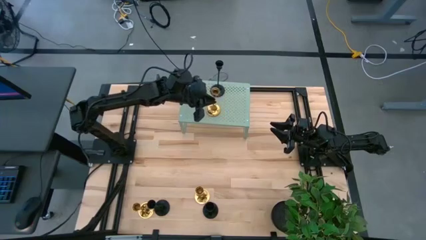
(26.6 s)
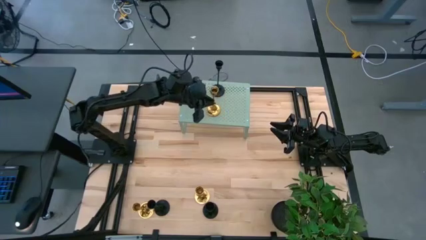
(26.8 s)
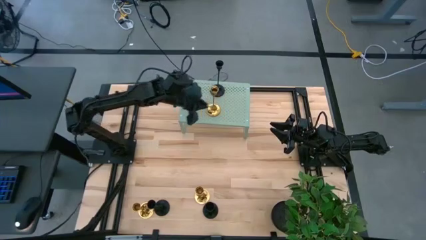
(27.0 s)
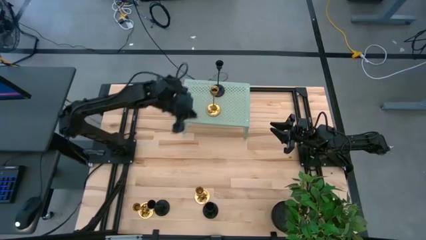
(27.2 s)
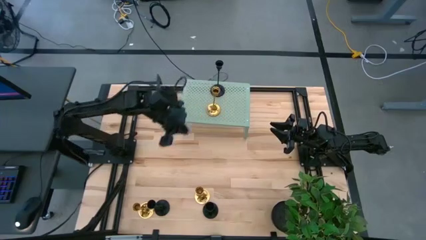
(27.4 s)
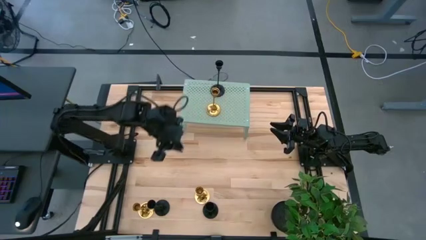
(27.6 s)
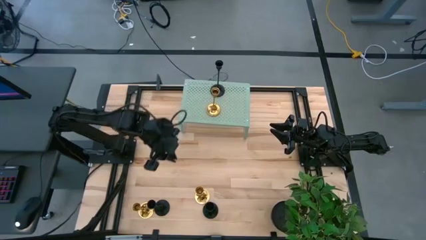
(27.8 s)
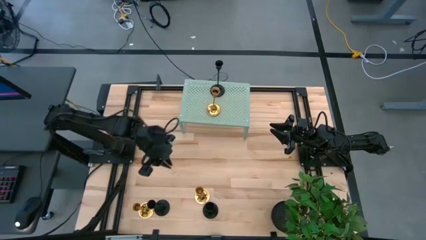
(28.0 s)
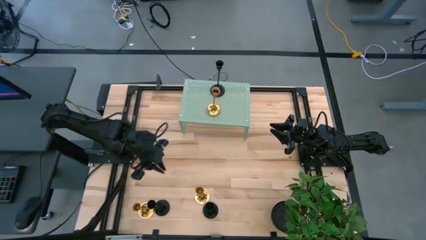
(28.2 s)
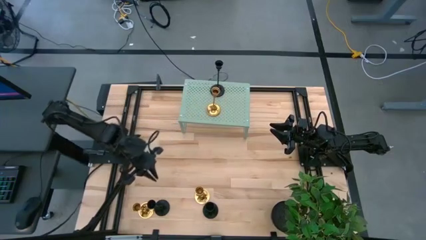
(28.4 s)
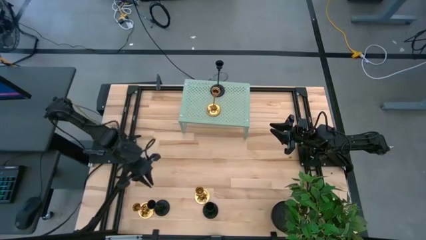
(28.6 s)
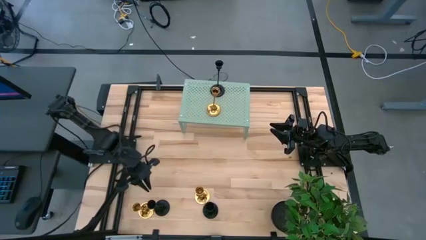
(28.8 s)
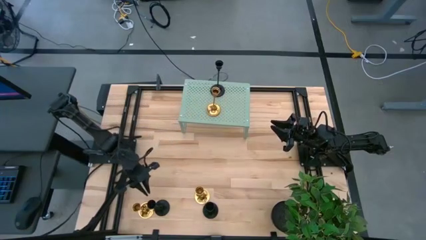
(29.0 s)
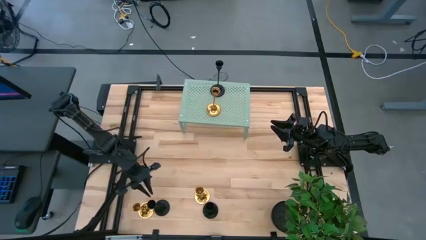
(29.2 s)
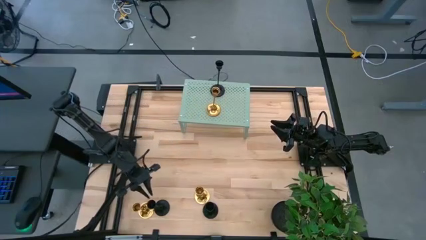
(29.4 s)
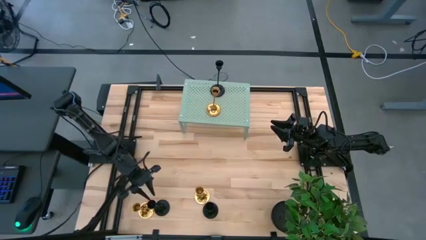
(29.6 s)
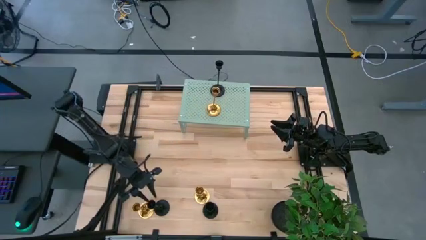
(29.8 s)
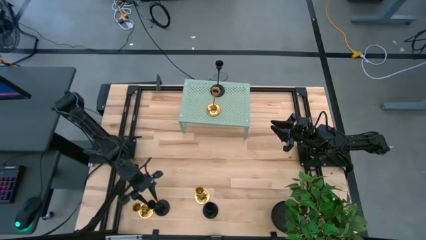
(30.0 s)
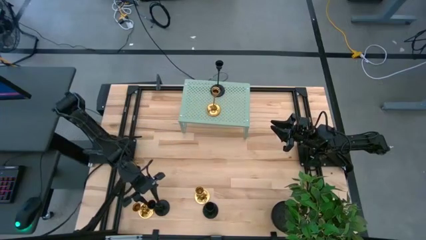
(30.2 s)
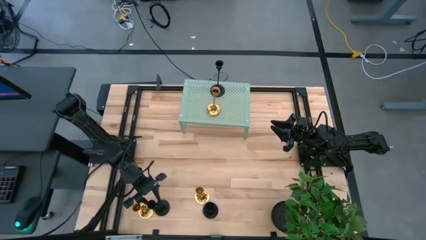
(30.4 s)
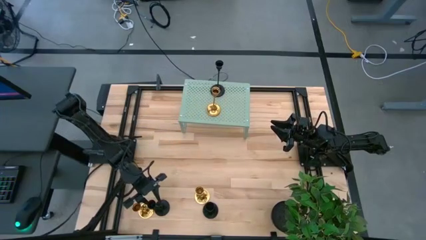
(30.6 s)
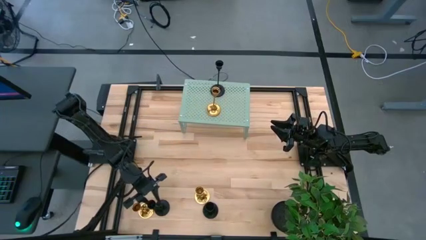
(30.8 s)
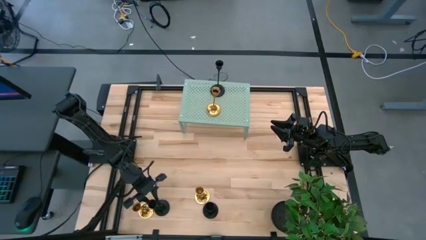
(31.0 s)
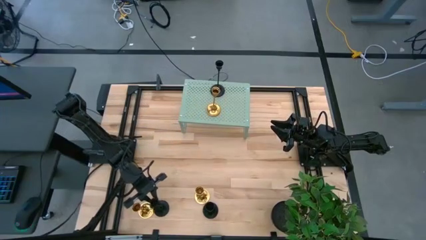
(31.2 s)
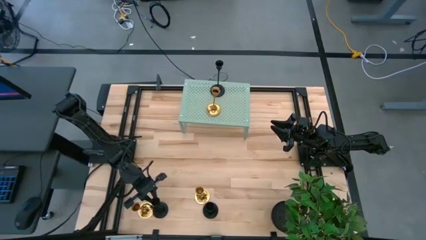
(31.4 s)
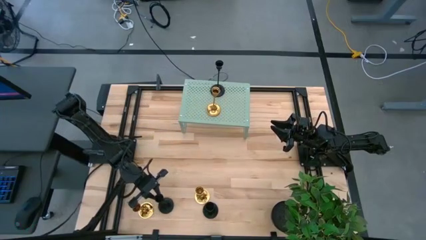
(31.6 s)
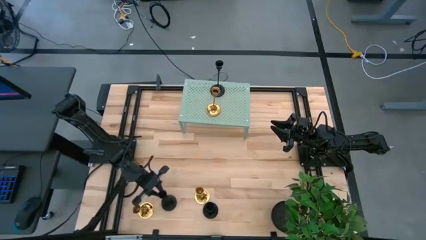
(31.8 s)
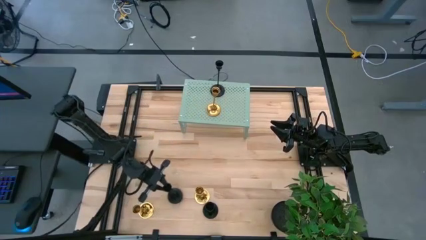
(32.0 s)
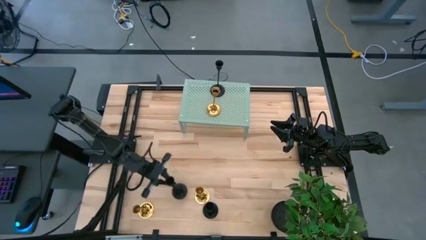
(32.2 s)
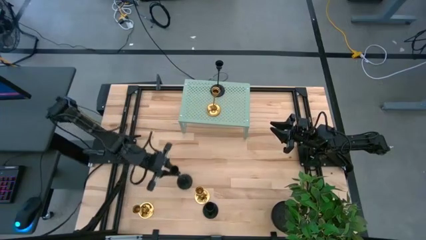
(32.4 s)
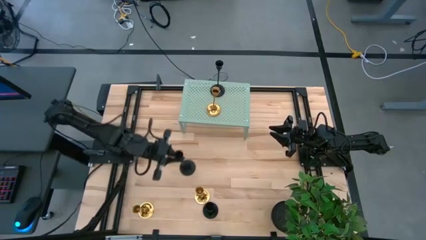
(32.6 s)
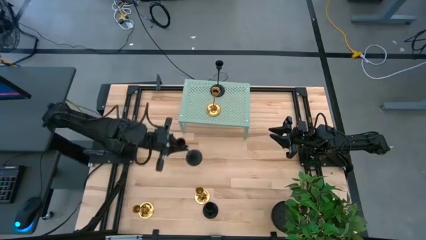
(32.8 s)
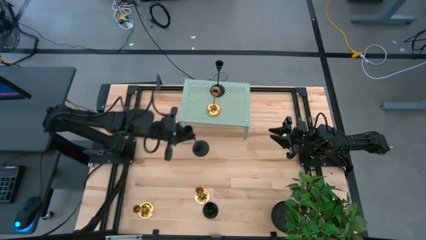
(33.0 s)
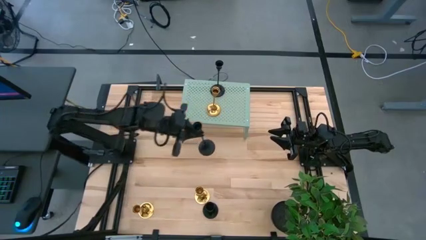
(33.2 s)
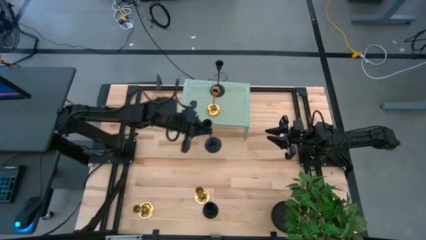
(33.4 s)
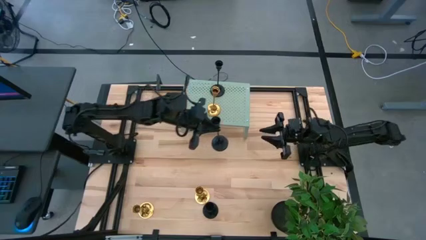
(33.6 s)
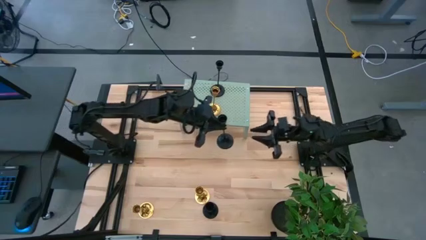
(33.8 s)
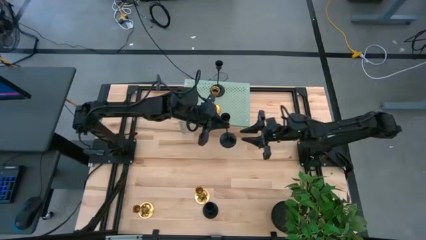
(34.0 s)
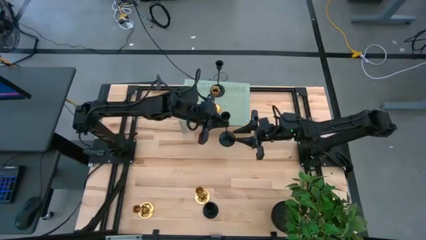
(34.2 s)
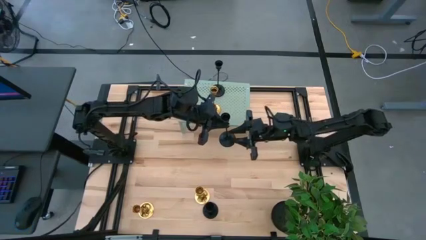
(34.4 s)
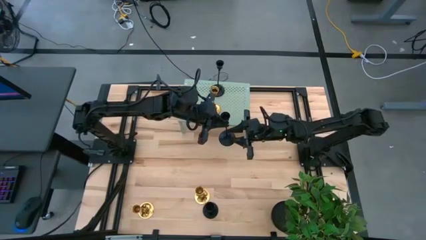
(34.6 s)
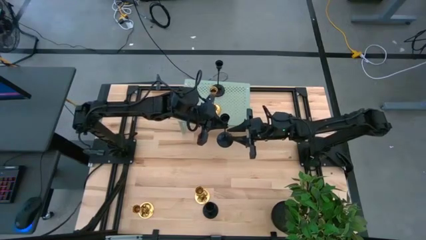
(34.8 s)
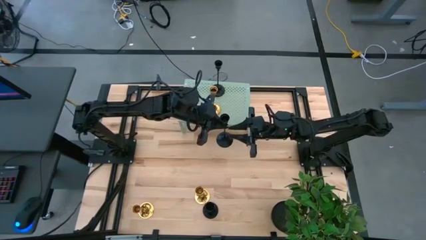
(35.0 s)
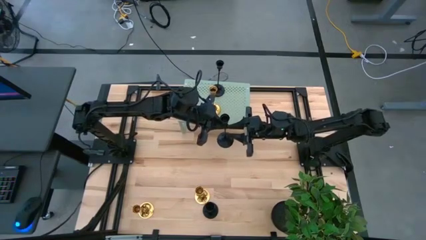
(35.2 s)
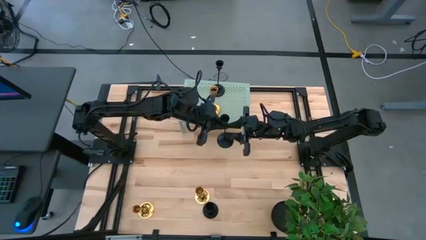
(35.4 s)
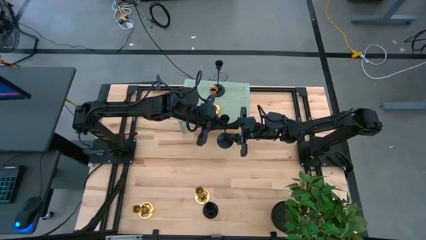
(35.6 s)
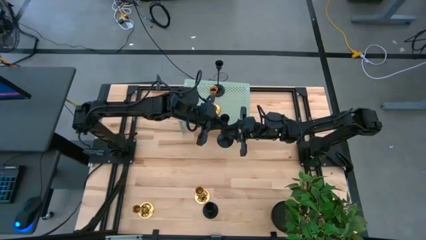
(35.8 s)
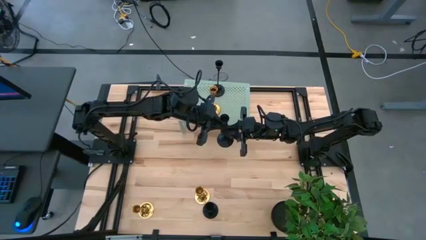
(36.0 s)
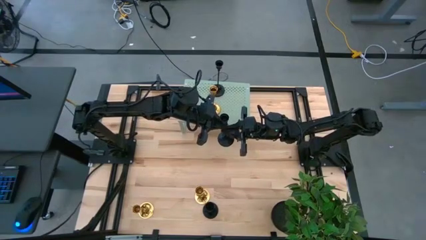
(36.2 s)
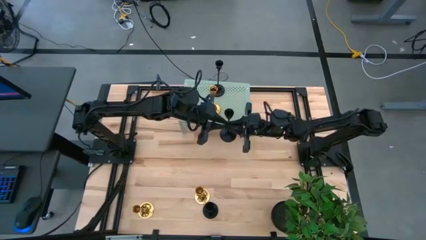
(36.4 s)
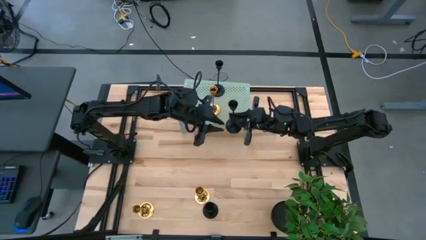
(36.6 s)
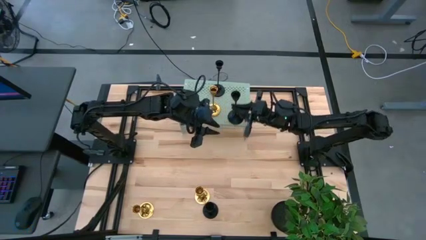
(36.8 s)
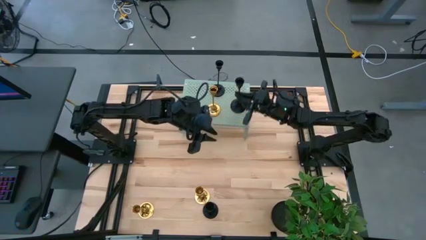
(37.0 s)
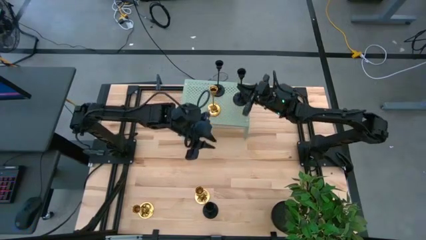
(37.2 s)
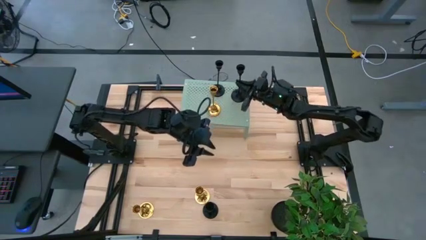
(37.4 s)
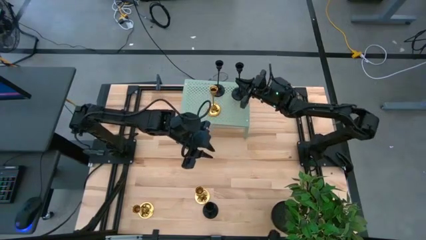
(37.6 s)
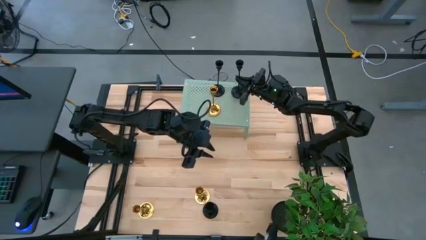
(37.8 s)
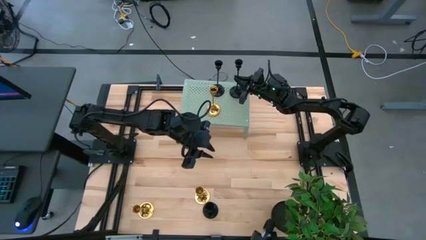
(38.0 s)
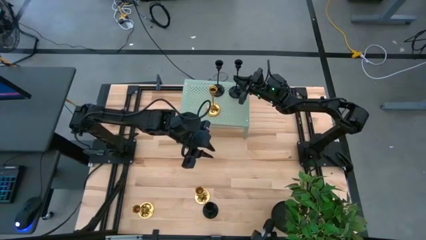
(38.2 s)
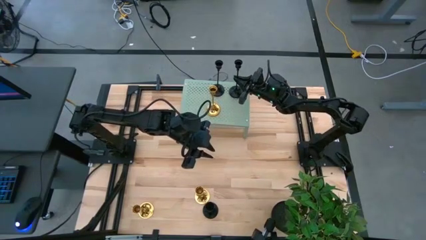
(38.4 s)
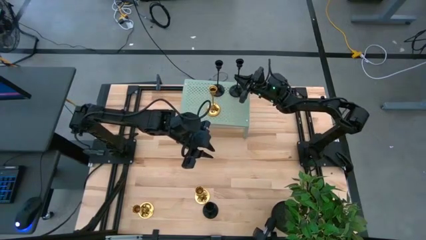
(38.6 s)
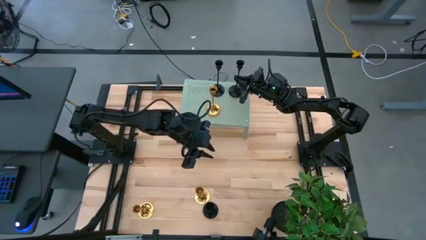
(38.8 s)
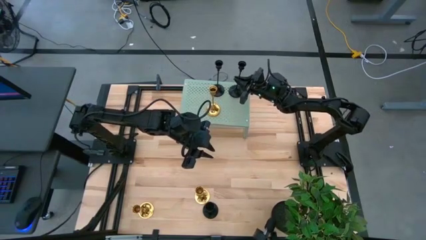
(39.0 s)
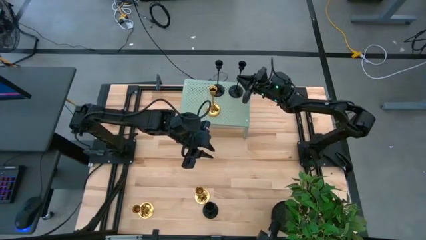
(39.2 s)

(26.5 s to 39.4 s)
Task: Pick & Place candle stick holders
Put the left black candle holder on the shelf aligned with the other black candle holder

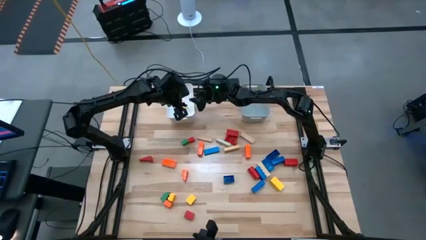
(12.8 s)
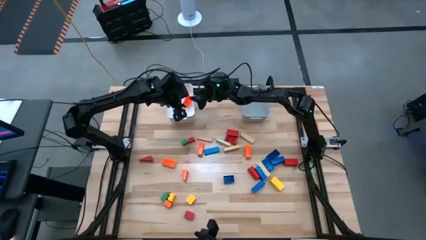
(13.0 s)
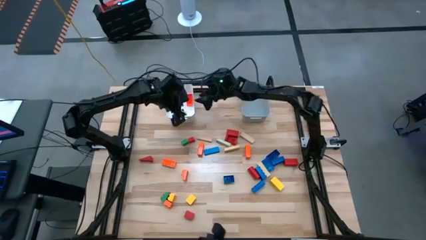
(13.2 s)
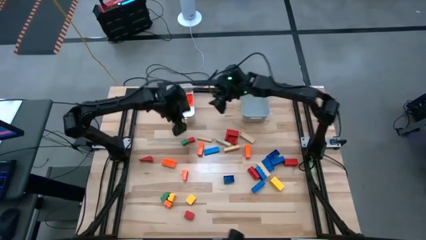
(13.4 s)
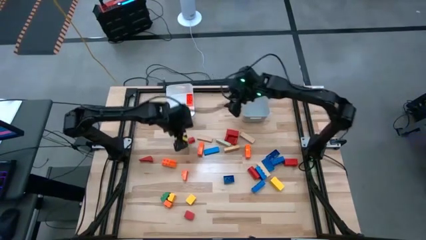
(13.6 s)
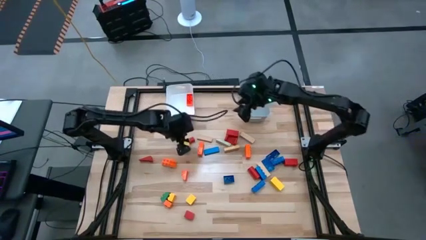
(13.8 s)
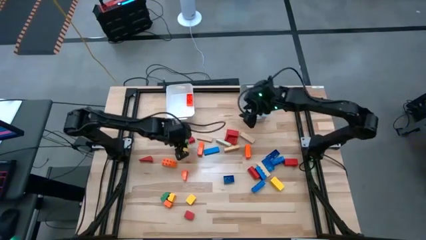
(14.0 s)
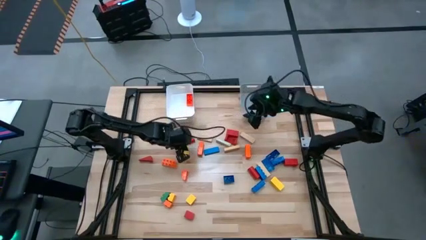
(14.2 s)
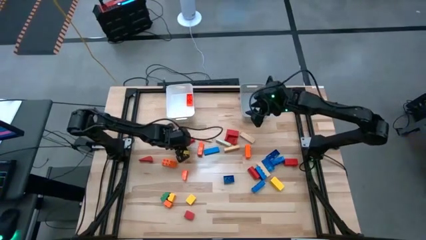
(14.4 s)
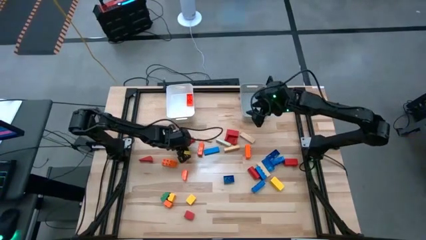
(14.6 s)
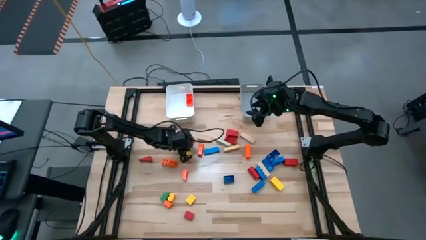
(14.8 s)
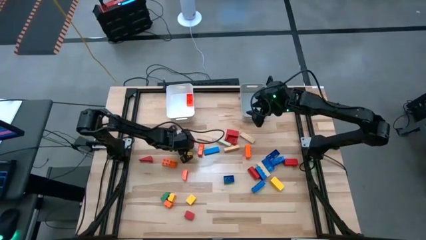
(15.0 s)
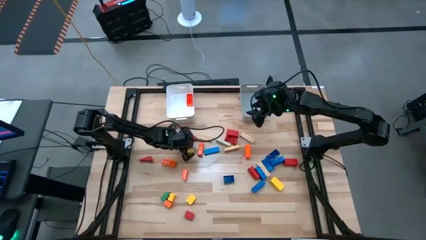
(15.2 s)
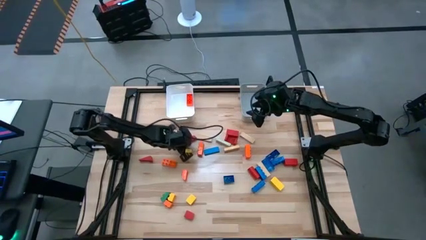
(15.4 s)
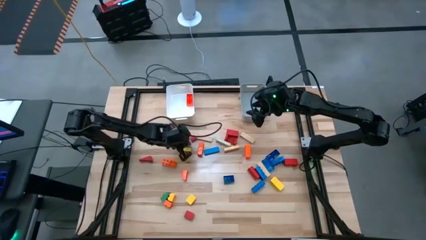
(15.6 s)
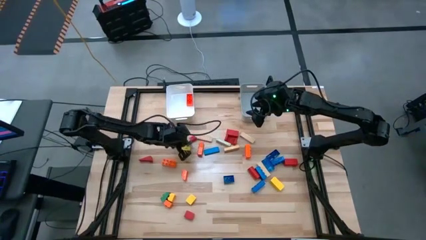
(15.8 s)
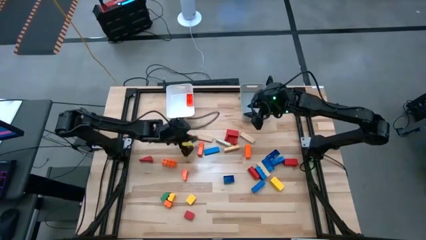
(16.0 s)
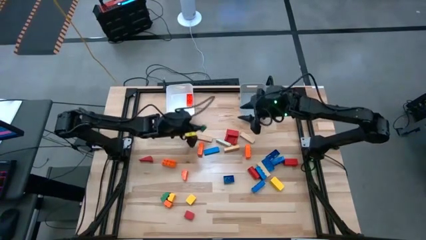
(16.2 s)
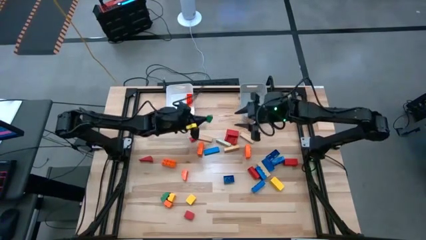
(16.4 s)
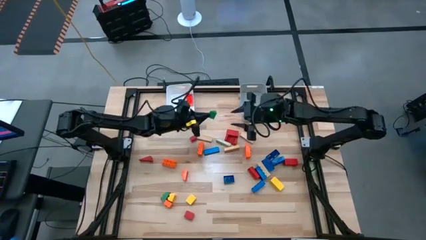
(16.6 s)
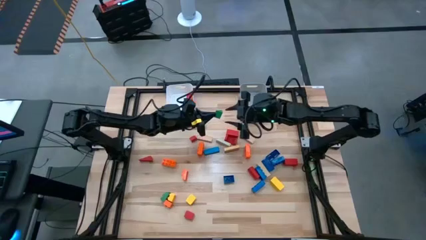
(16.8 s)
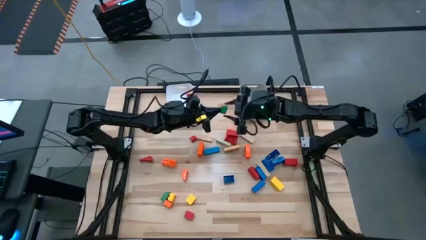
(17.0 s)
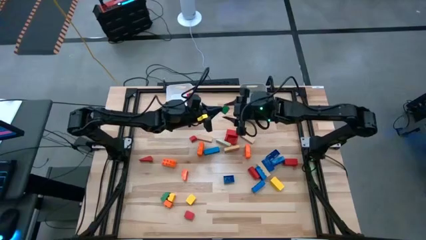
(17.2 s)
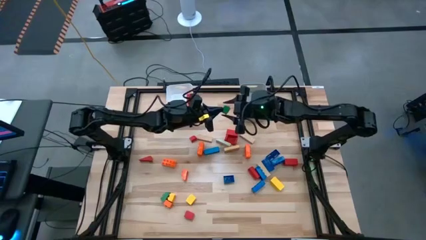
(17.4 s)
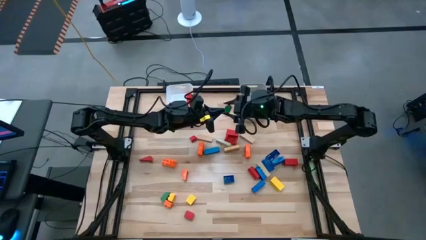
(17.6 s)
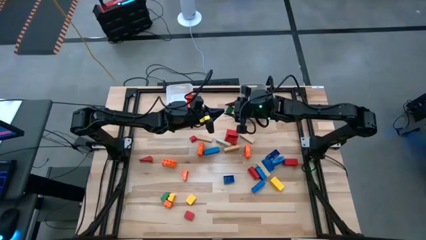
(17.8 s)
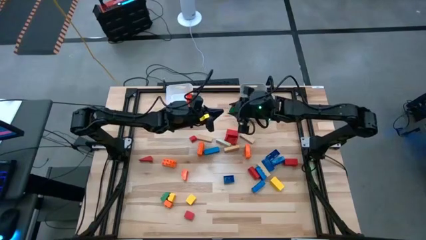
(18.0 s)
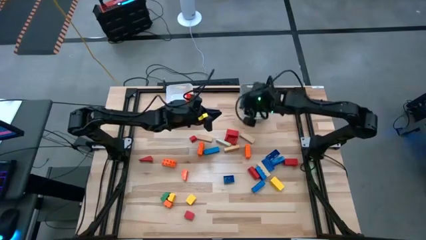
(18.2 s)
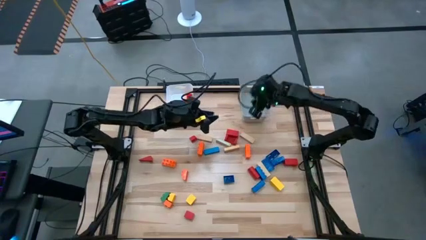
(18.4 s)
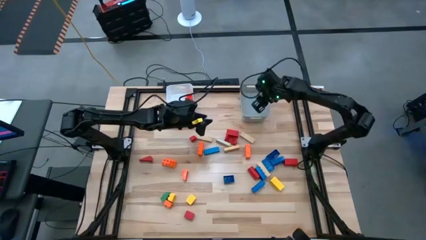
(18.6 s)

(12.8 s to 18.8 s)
Task: Sort blocks by size
Put the green triangle wooden block into the gray bin
